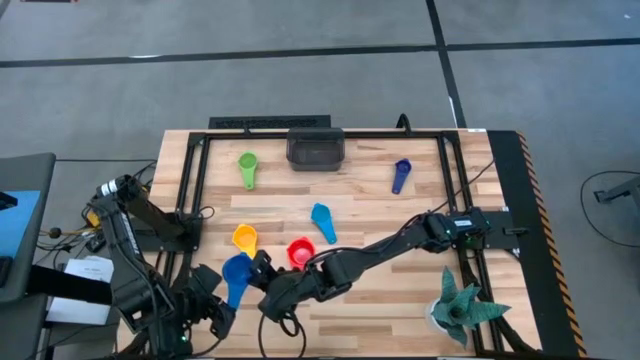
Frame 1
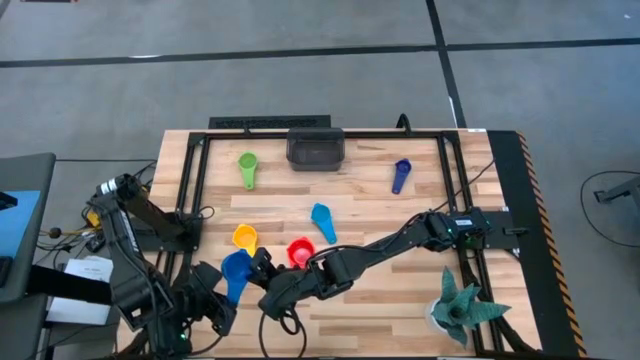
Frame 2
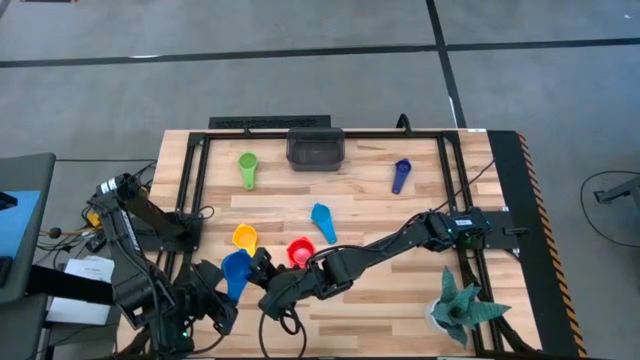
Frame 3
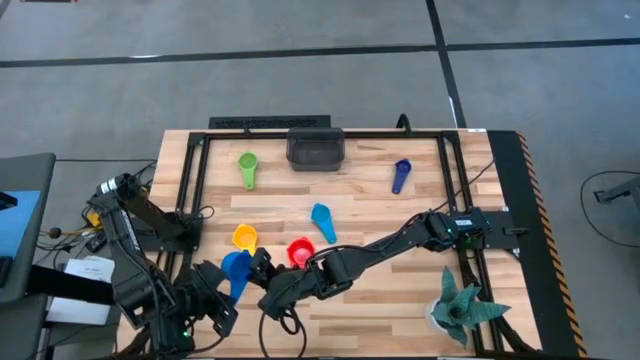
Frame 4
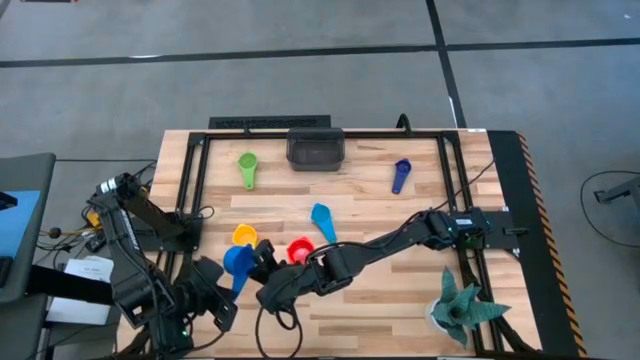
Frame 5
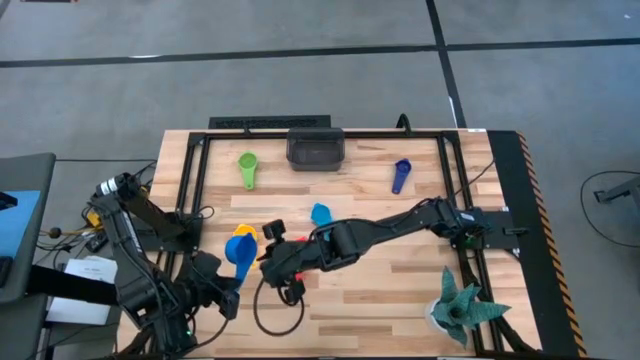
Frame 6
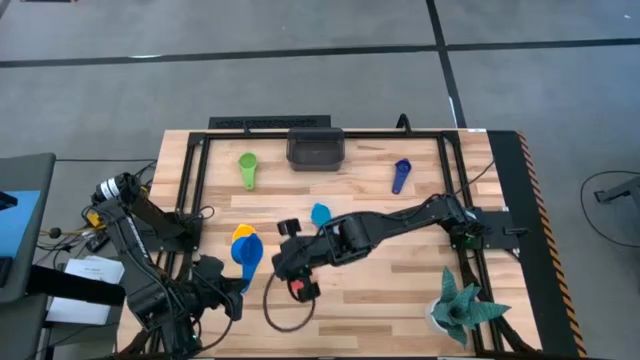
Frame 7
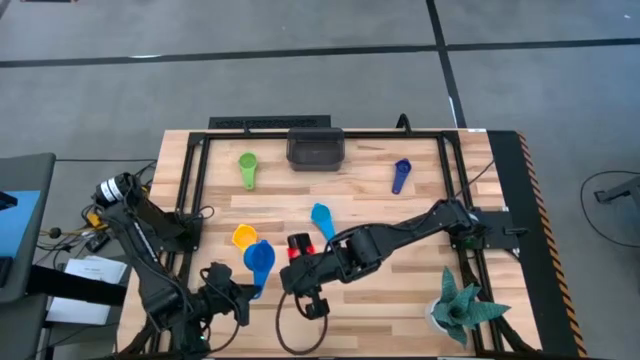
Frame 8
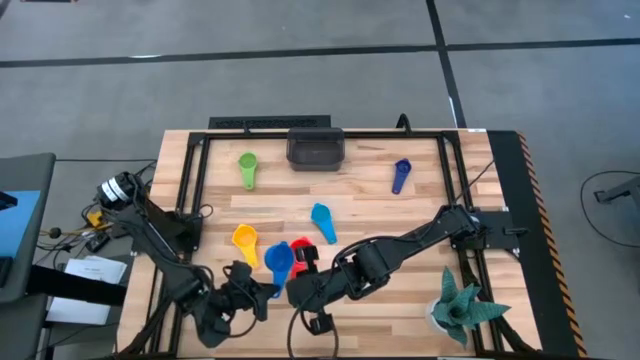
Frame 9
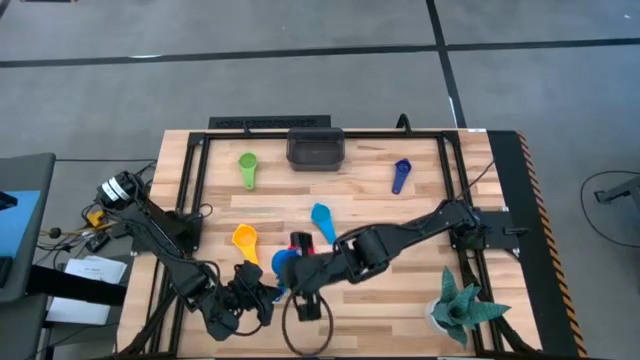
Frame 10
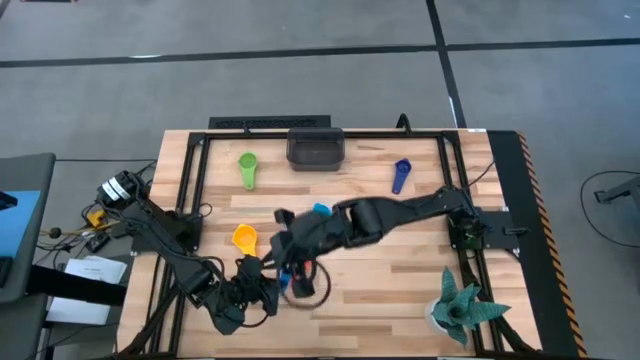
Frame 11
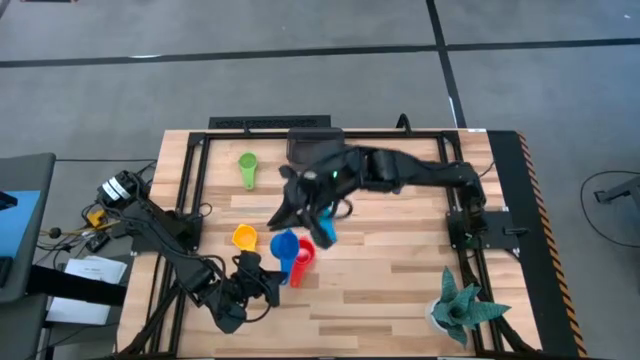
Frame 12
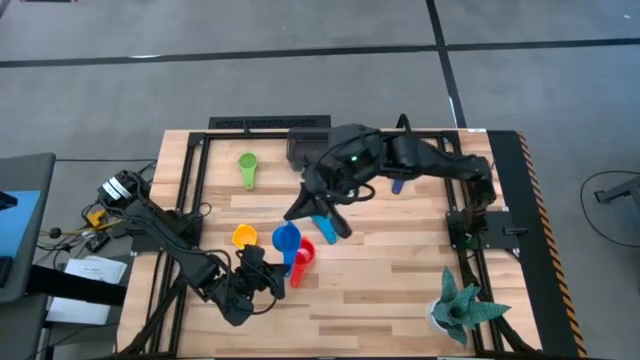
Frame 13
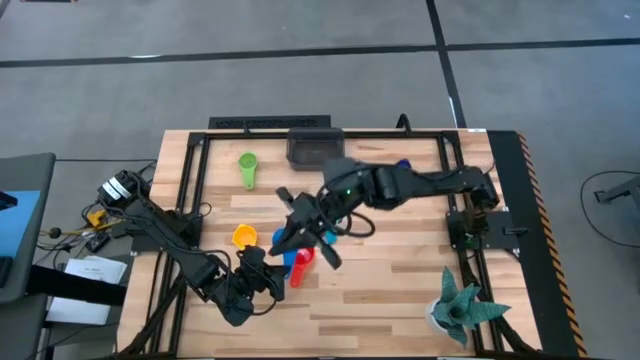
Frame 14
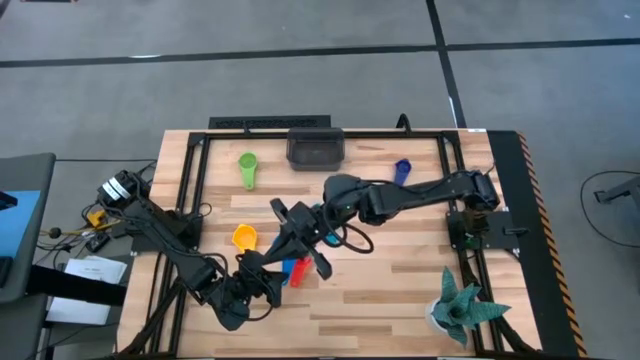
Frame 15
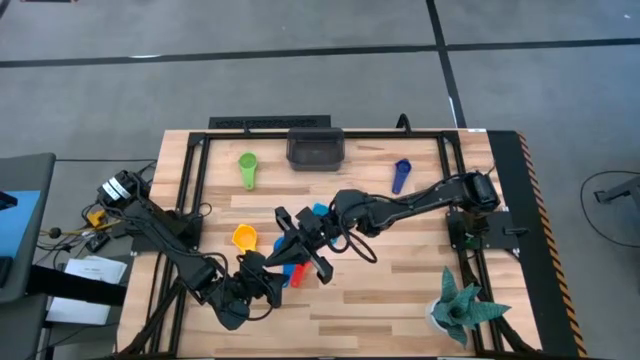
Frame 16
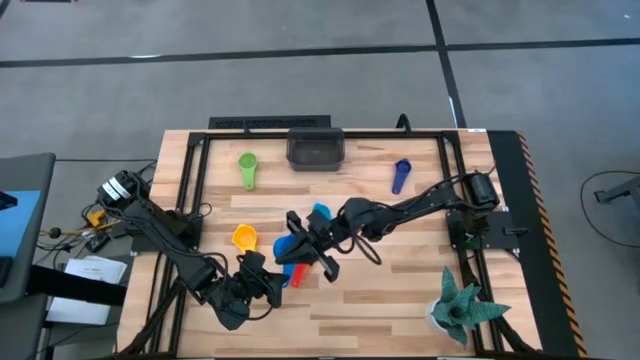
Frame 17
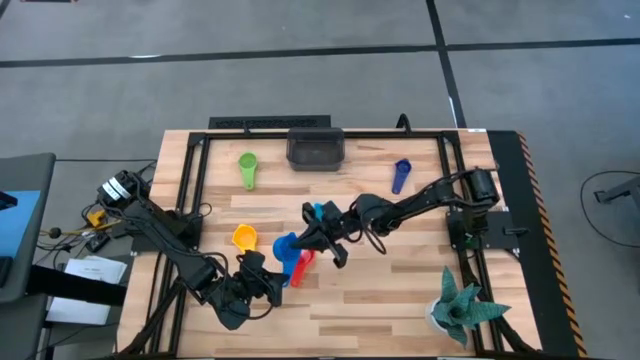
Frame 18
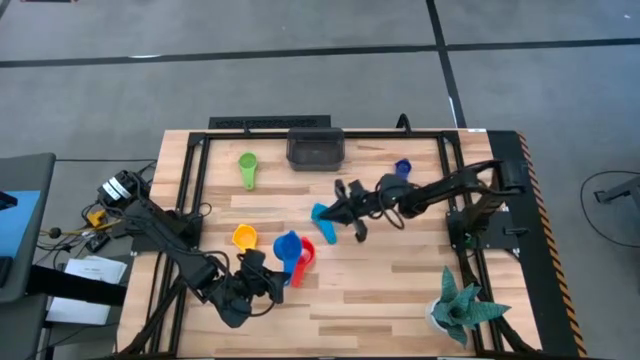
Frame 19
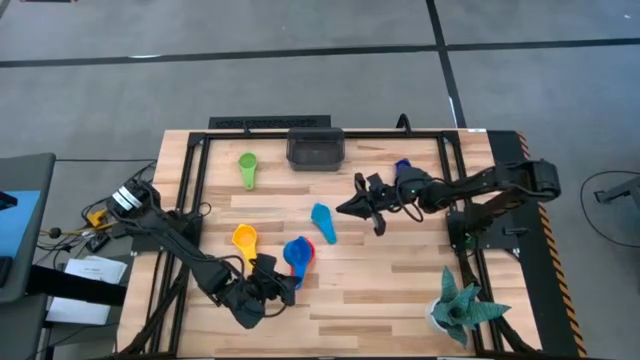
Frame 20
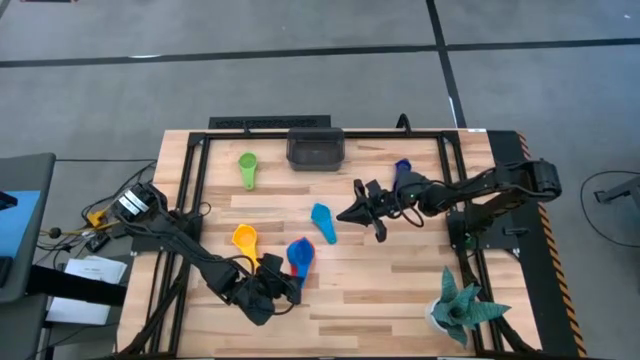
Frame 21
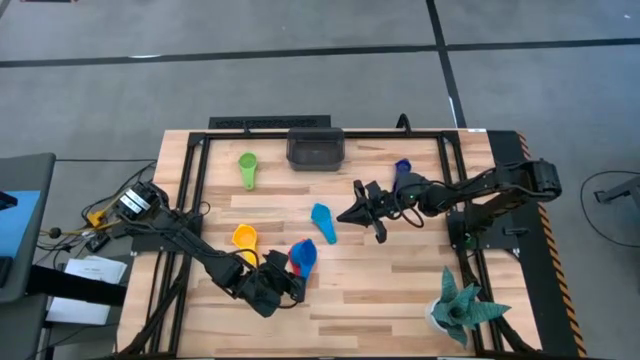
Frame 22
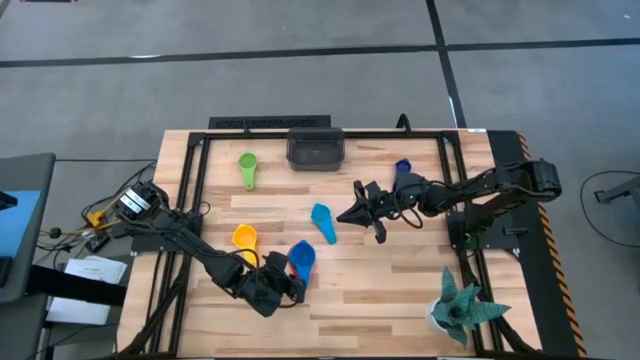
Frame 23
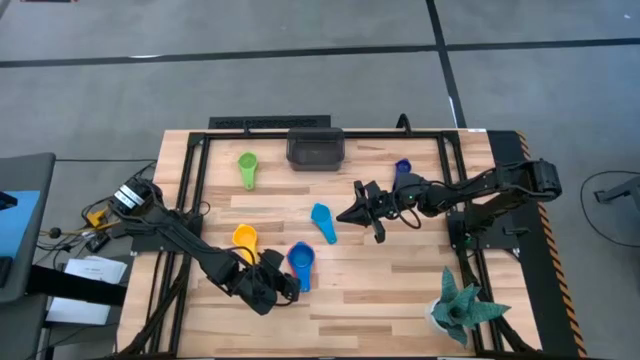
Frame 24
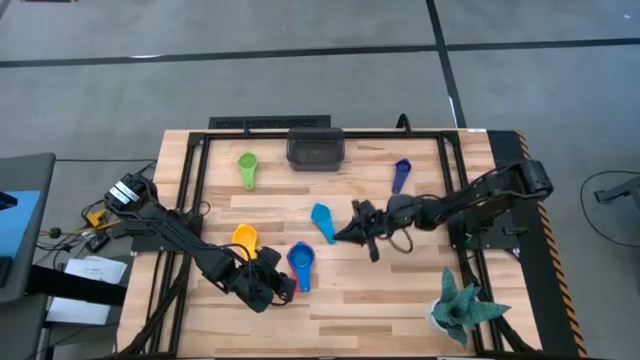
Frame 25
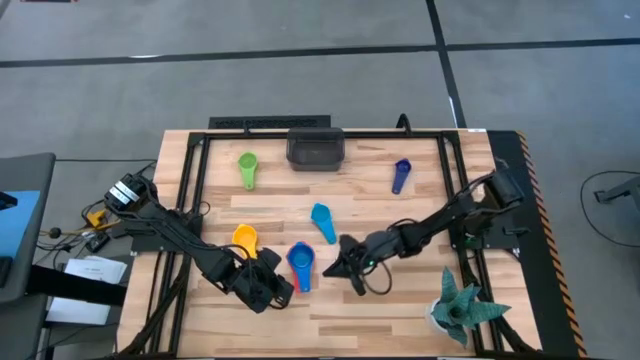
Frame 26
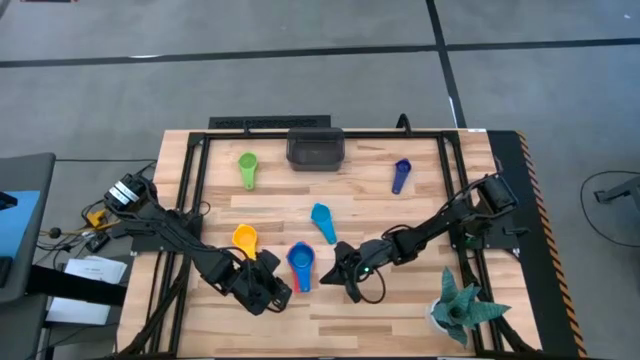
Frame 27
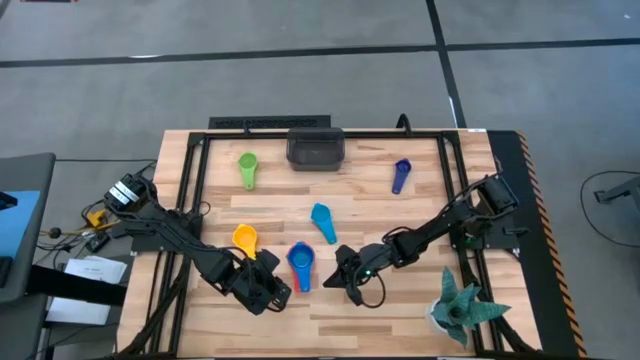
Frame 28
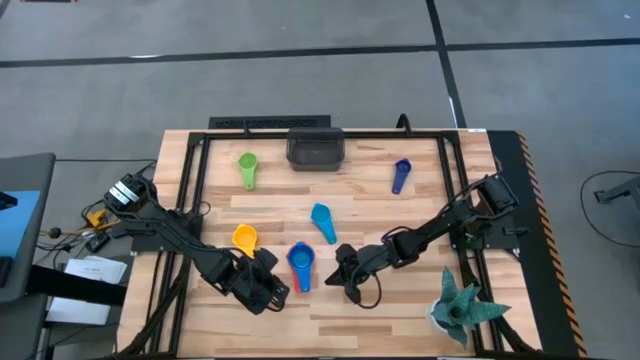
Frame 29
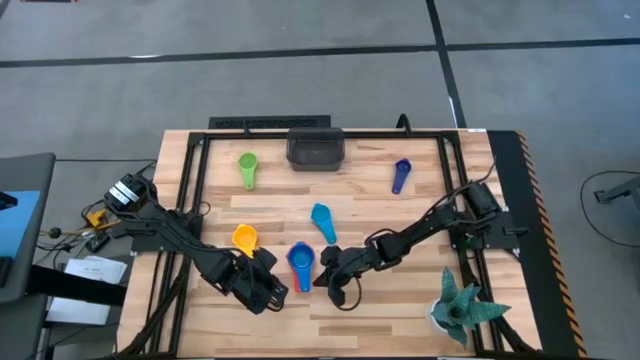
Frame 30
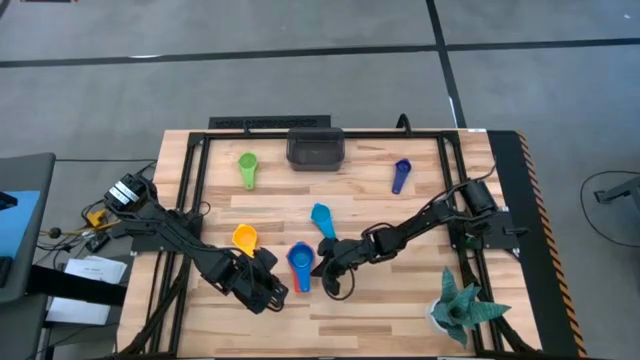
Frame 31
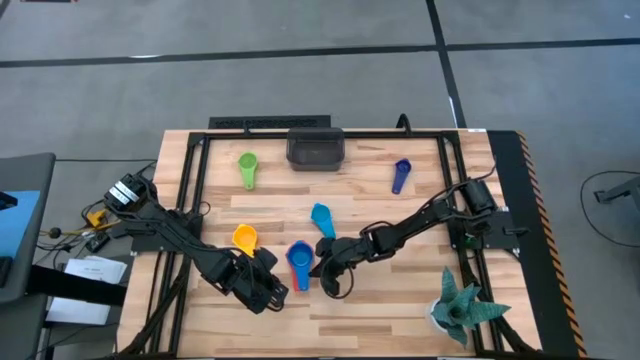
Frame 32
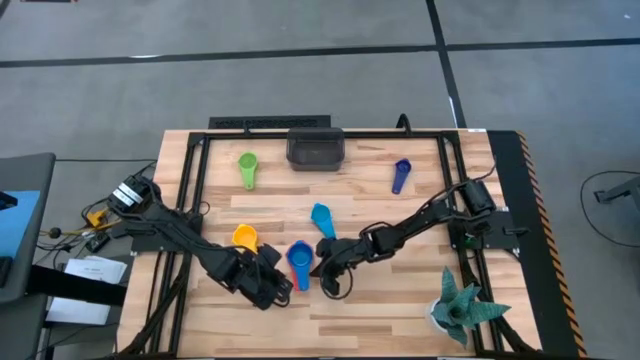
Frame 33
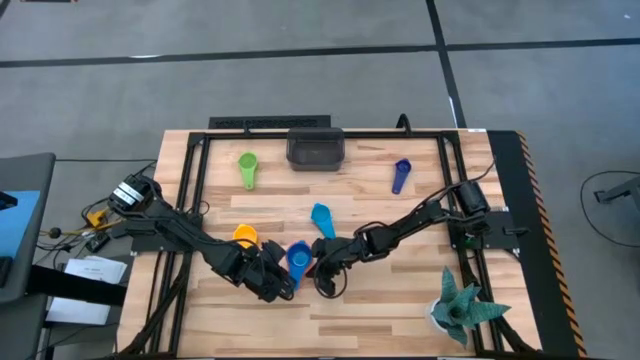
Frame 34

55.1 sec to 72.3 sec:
Task: Nest measuring cups in basket
Stack the blue measuring cup on top of the red measuring cup
